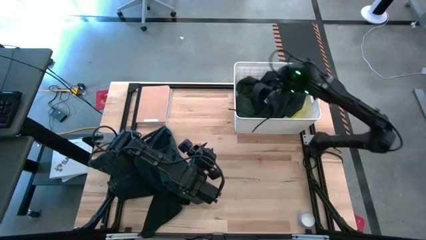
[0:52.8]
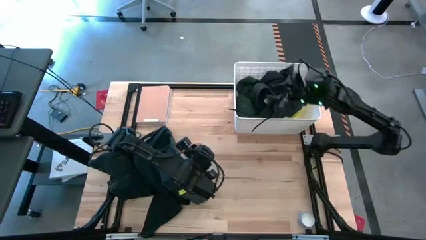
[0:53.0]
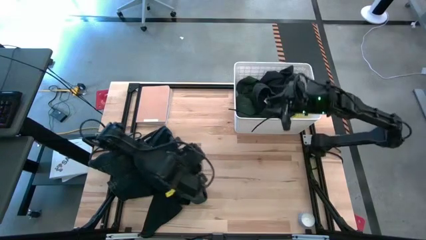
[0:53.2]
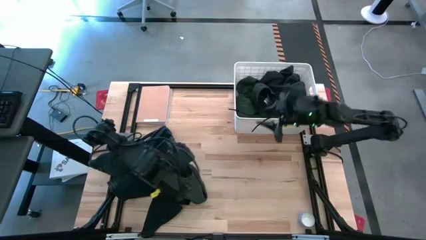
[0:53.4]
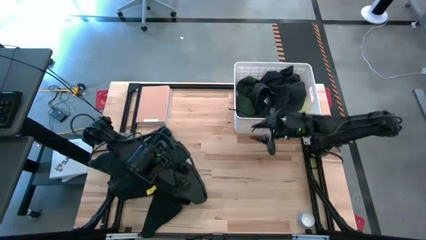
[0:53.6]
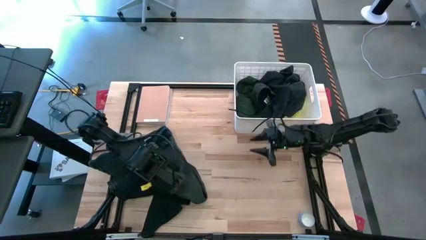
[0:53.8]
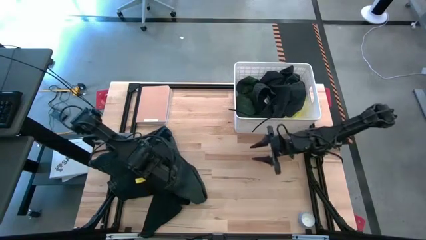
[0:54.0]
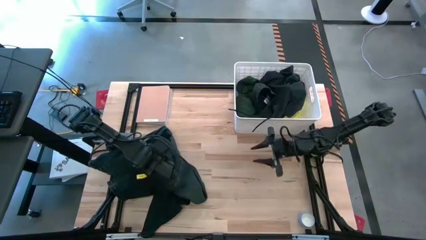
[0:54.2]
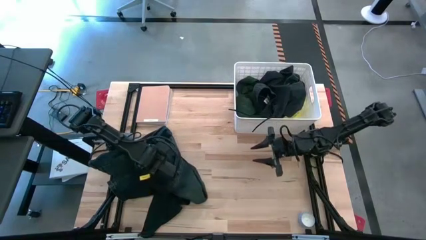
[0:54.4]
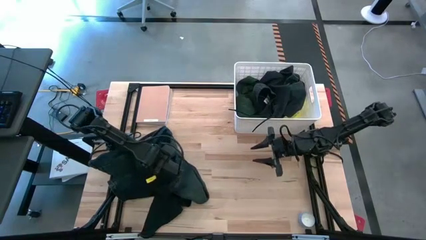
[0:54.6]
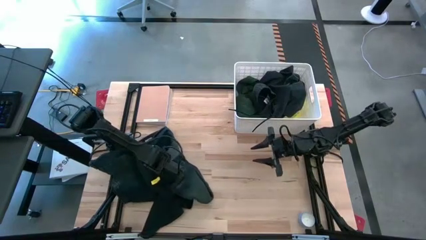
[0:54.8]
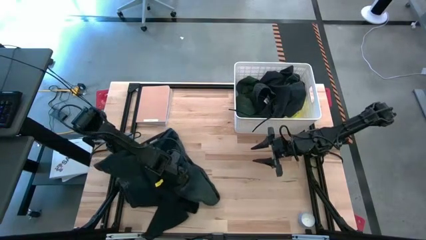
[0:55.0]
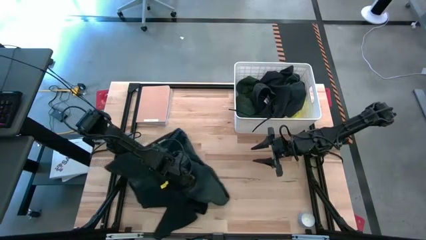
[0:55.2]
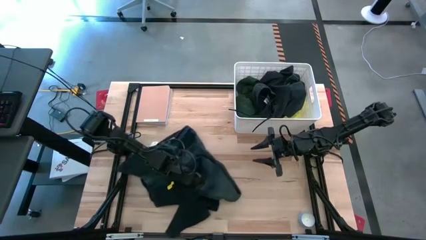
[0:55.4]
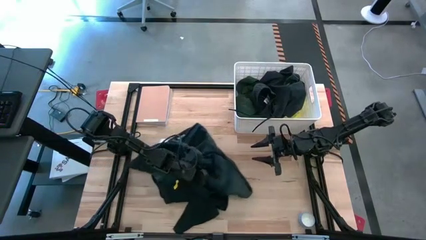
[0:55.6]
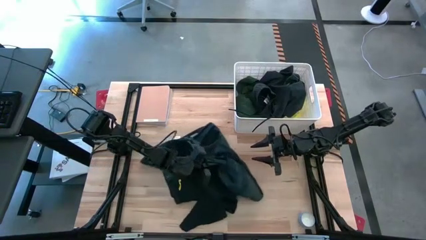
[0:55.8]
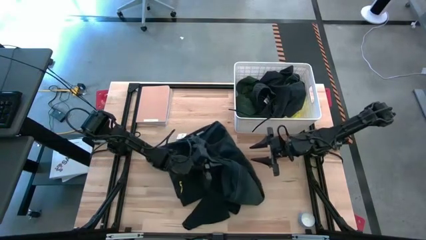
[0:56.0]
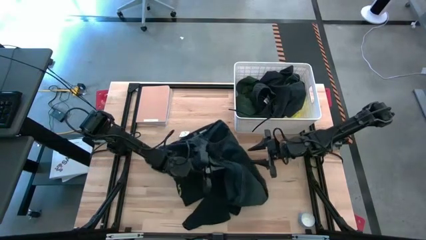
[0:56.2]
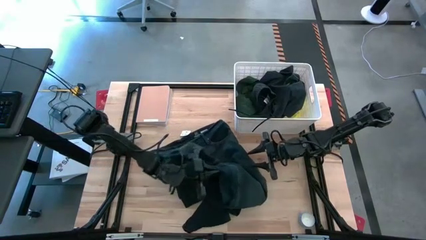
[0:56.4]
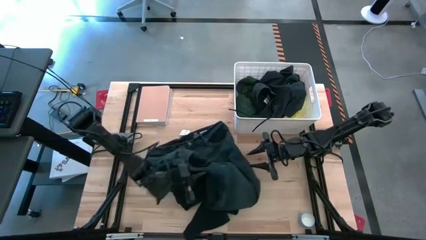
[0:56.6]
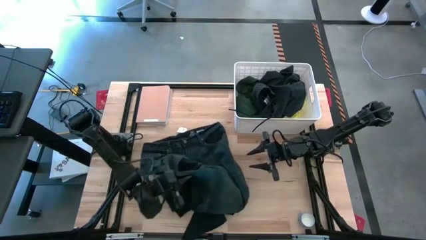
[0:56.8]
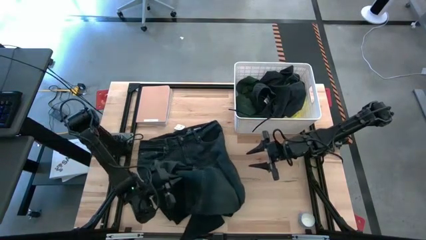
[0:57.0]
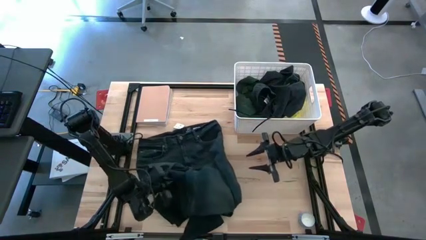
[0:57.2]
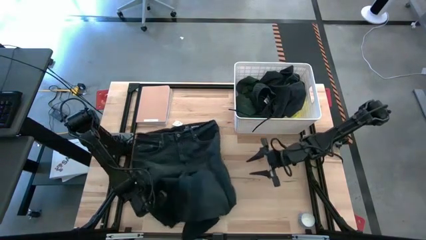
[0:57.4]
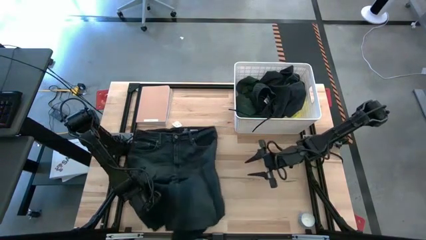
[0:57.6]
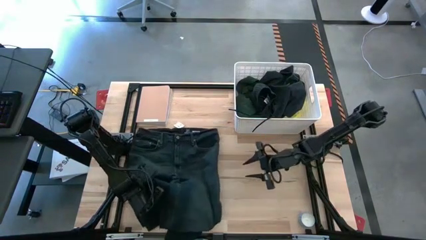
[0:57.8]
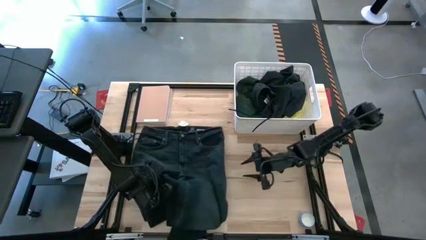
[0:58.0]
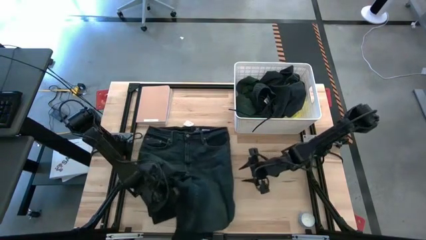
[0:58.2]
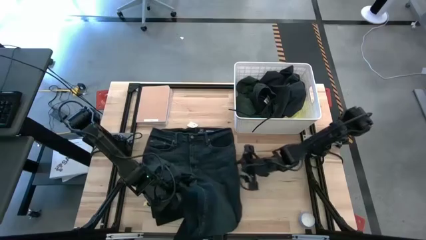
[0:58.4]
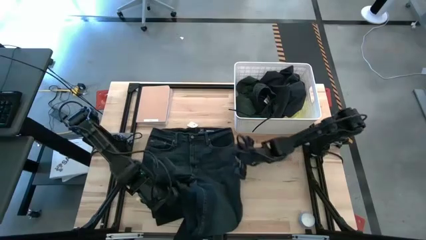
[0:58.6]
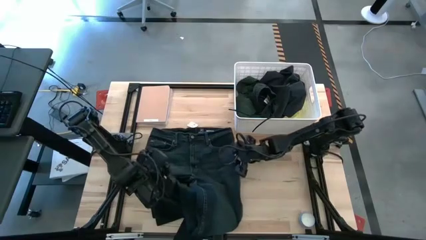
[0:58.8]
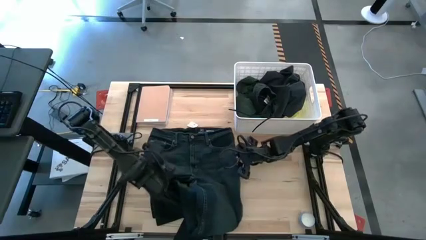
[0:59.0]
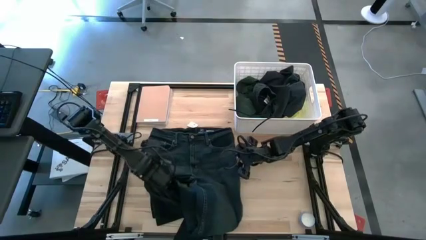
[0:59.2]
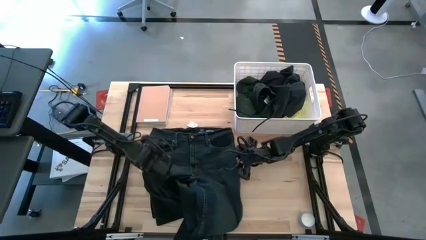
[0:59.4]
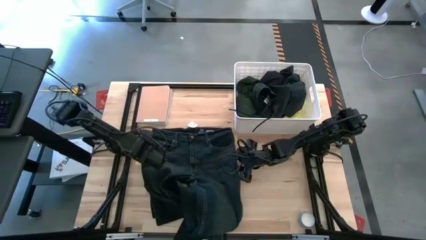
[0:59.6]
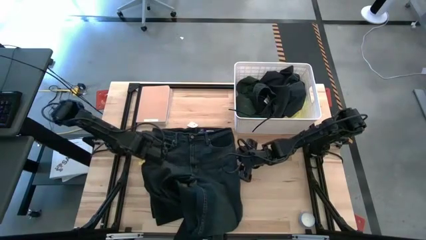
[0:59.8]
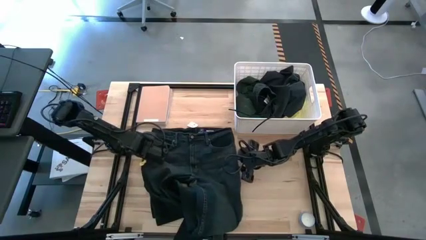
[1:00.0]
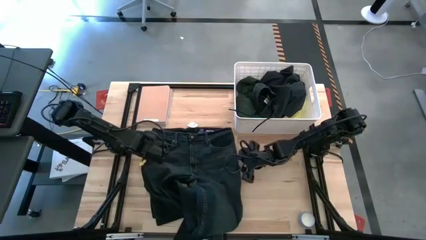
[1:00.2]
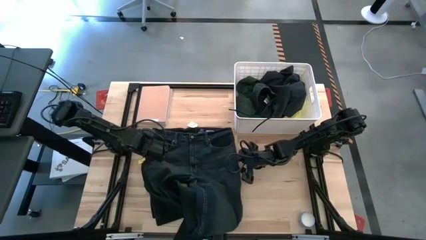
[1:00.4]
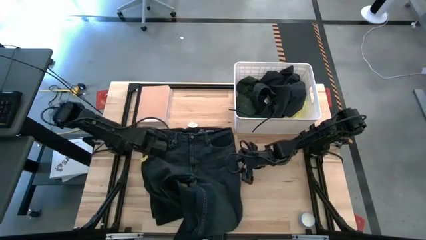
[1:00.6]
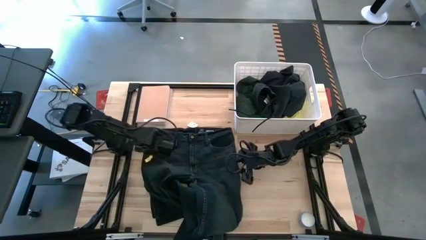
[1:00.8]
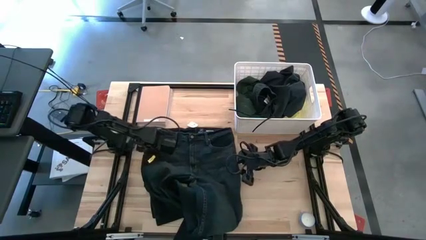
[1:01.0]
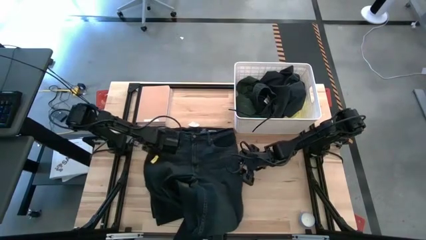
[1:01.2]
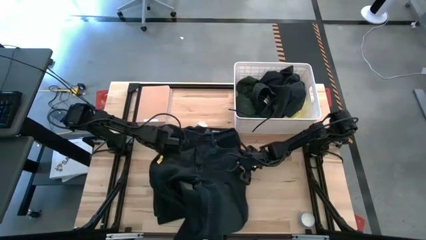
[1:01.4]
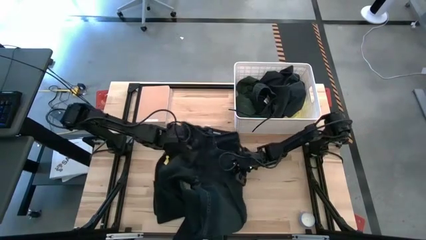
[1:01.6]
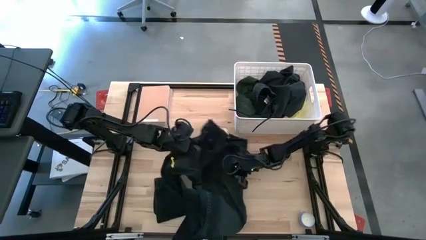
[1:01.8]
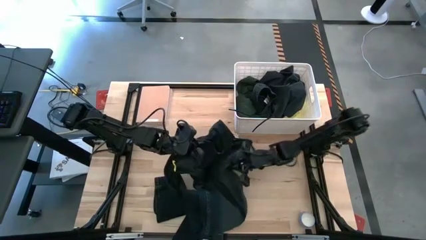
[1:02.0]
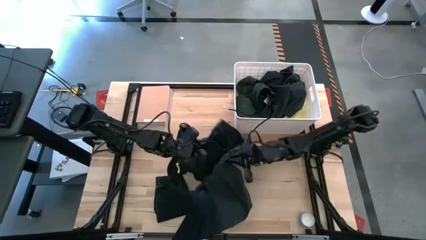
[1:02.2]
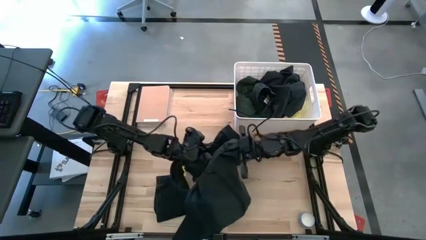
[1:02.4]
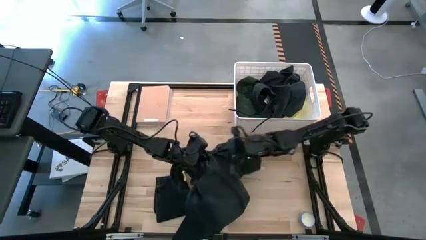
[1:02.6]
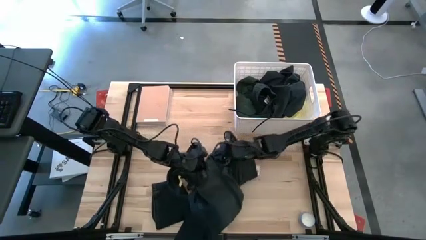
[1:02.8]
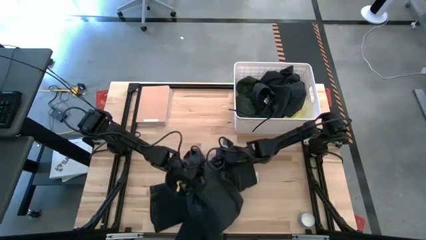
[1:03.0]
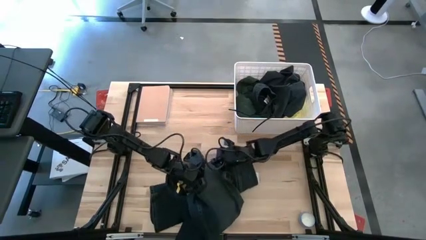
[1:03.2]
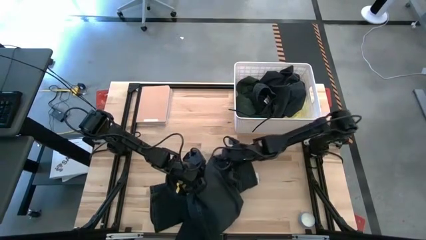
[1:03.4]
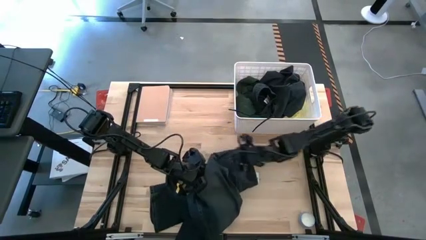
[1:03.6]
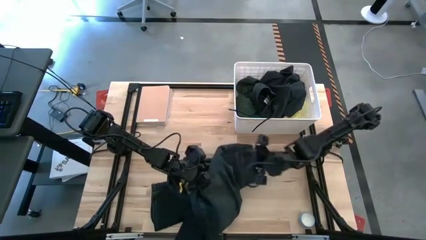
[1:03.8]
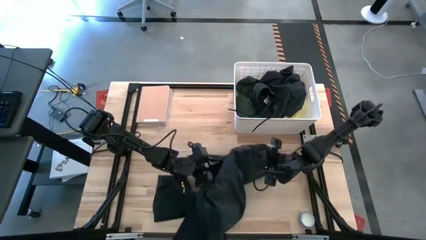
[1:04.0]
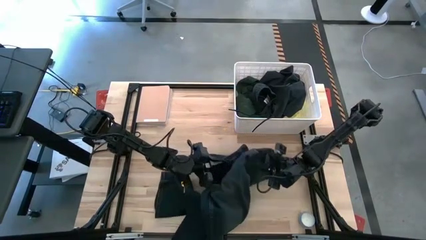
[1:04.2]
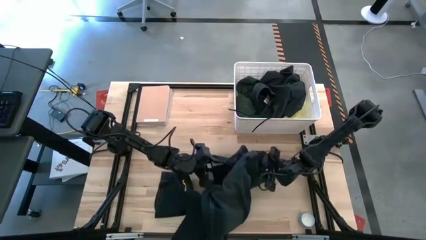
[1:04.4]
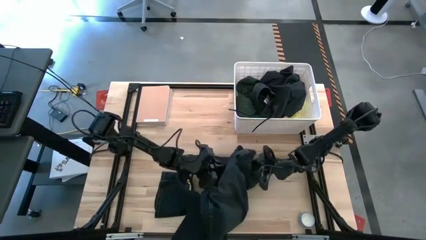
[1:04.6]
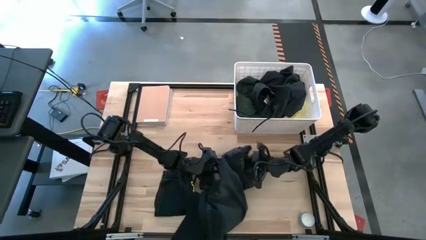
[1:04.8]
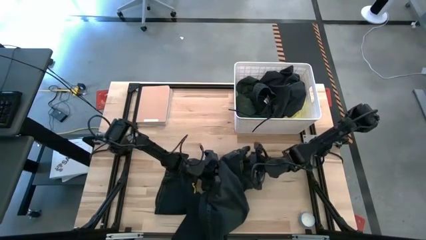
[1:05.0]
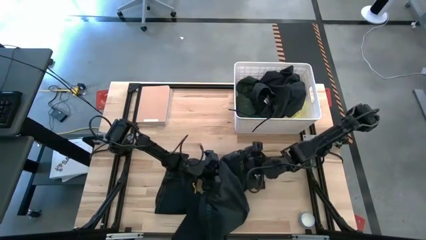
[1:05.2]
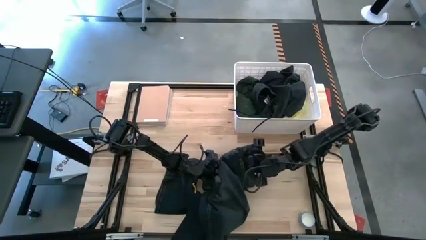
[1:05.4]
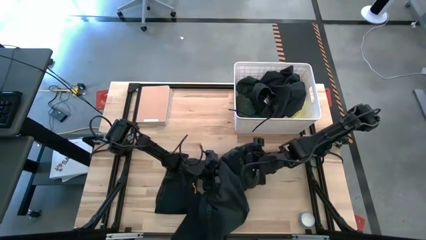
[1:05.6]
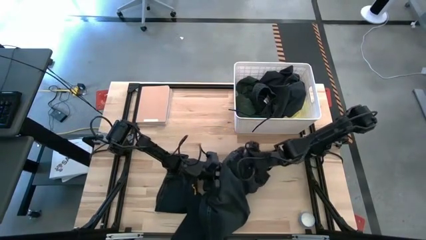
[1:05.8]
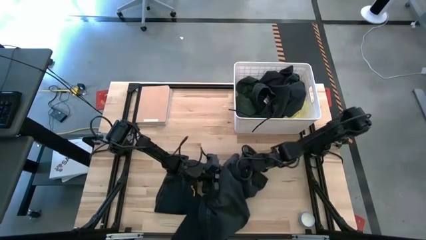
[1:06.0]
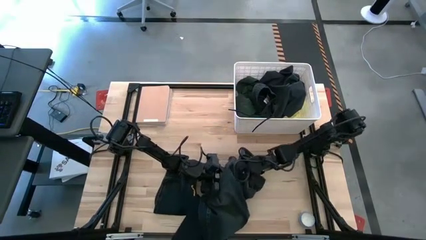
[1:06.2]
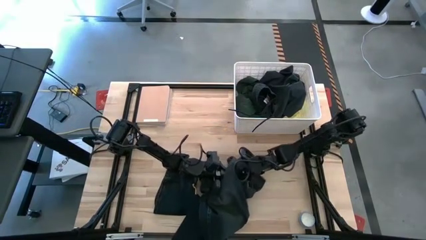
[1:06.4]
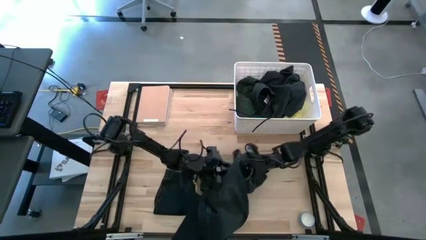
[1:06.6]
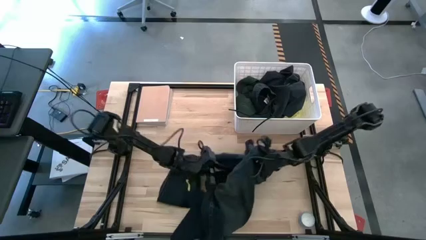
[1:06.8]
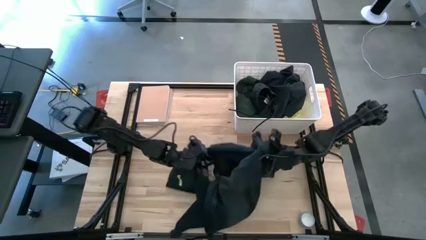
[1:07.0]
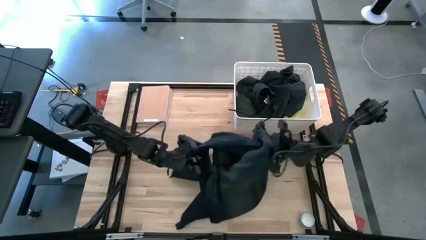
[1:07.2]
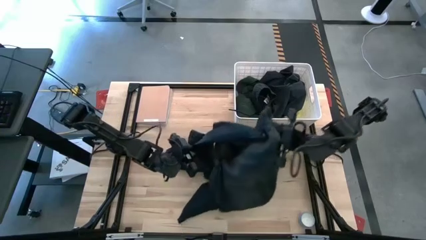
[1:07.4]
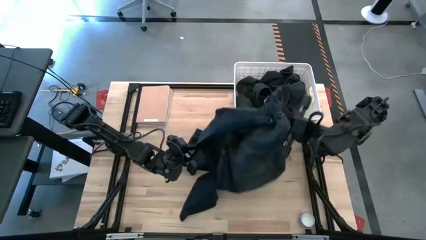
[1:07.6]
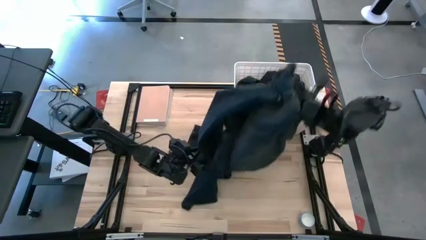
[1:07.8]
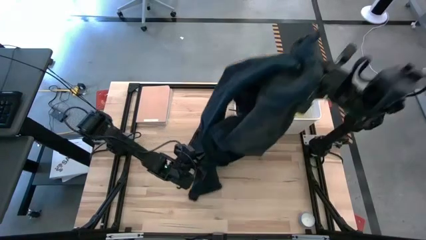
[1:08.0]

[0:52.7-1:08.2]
Task: Sort clothes
Put the dark blue jeans into the white laundry bin

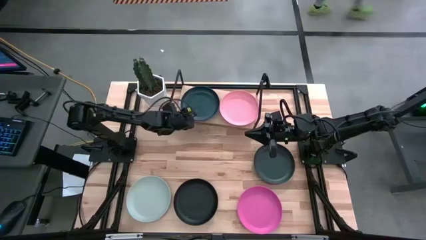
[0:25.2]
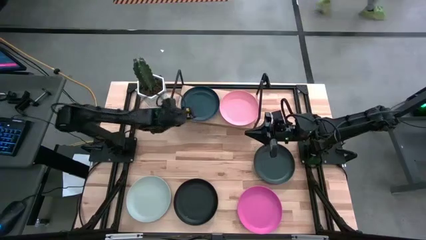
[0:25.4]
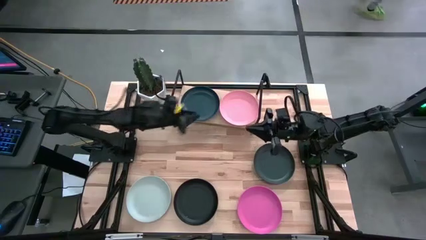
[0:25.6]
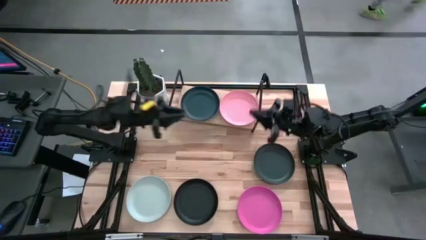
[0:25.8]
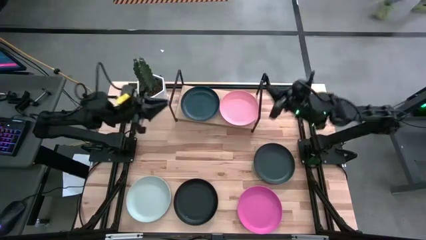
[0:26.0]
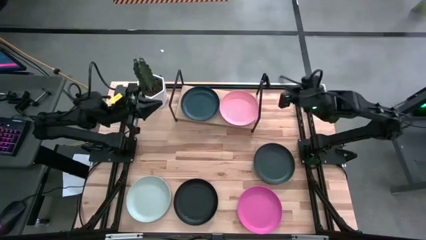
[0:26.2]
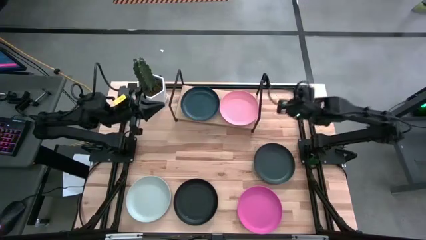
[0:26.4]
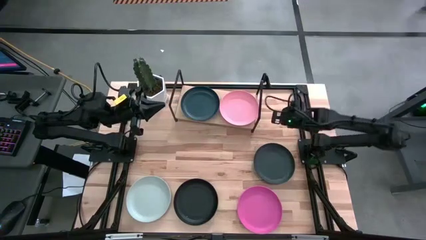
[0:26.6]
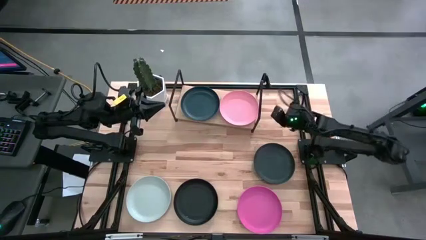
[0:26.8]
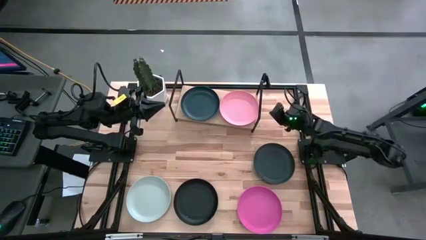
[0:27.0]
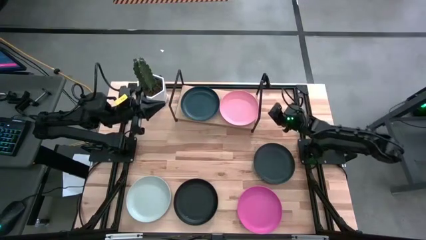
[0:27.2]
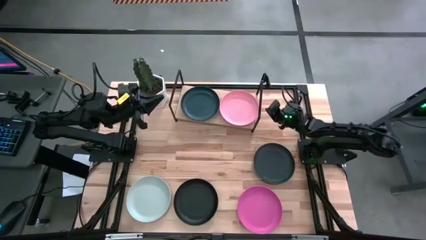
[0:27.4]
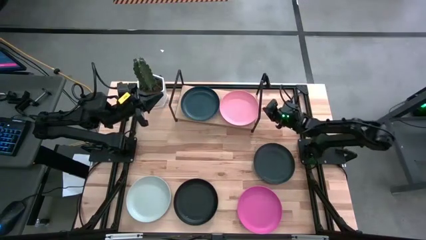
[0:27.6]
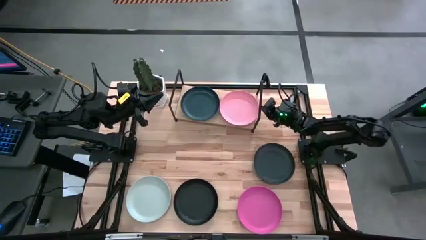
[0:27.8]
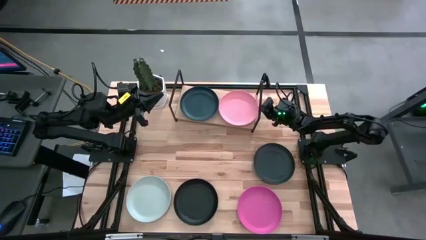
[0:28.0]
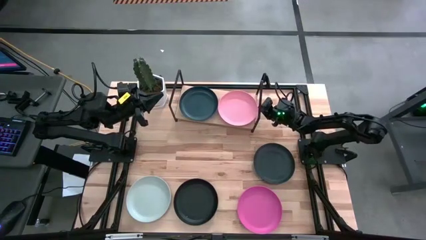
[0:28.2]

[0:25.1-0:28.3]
Task: Place and stack plates onto a shelf
Adjust the light pink plate on the shelf
